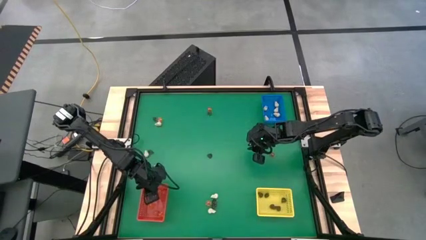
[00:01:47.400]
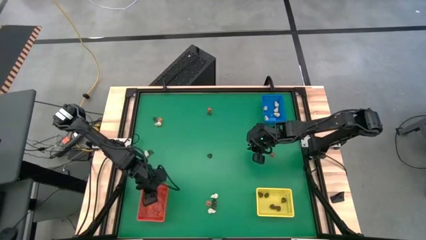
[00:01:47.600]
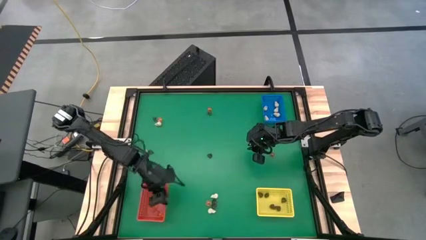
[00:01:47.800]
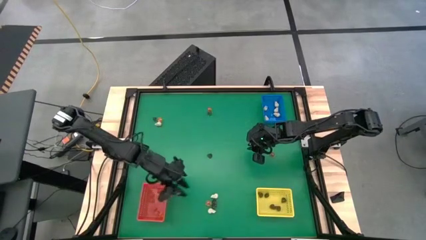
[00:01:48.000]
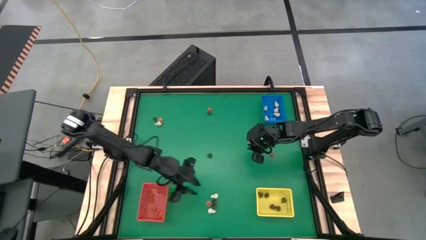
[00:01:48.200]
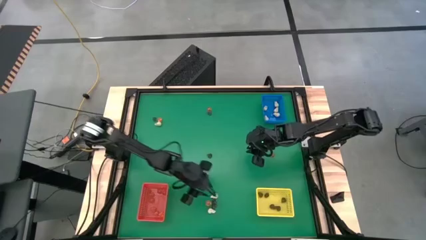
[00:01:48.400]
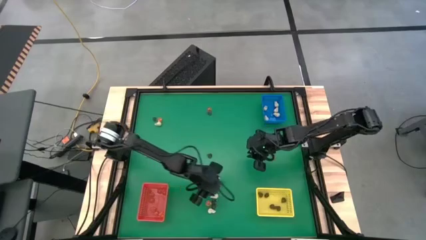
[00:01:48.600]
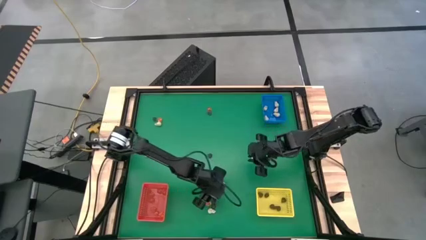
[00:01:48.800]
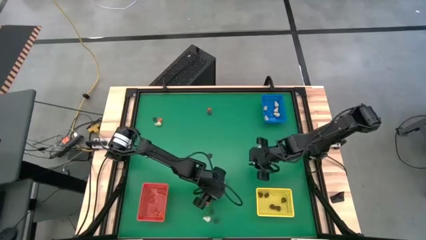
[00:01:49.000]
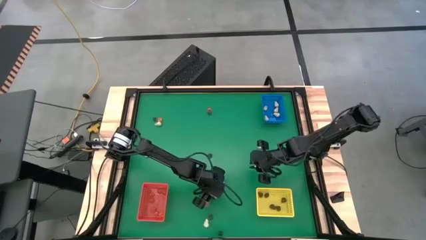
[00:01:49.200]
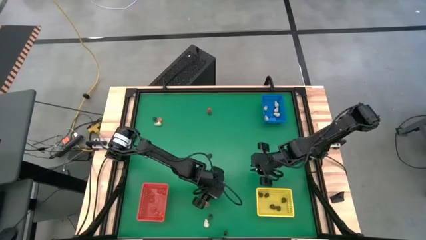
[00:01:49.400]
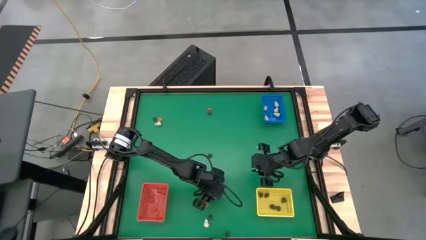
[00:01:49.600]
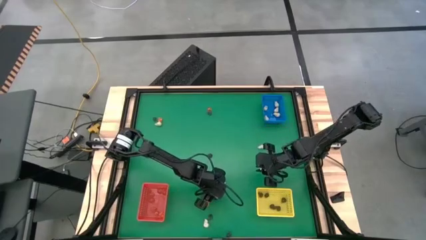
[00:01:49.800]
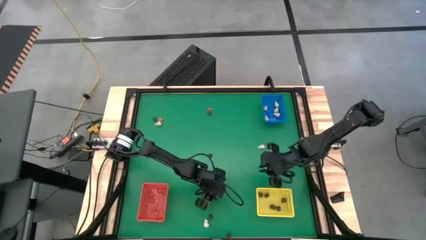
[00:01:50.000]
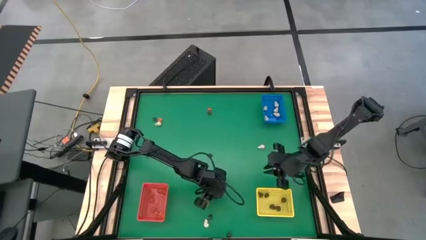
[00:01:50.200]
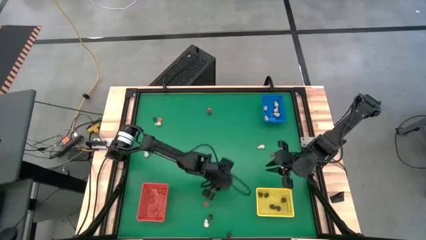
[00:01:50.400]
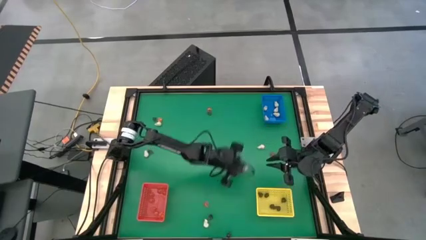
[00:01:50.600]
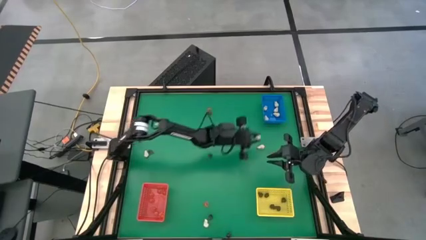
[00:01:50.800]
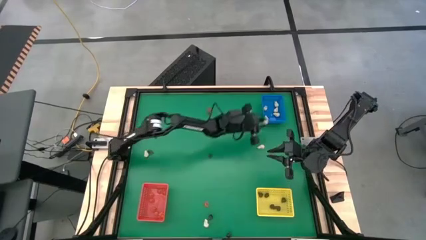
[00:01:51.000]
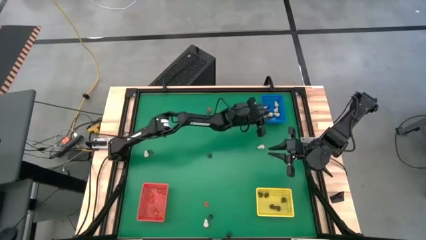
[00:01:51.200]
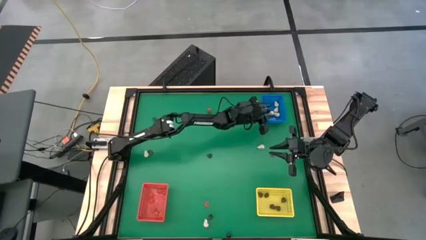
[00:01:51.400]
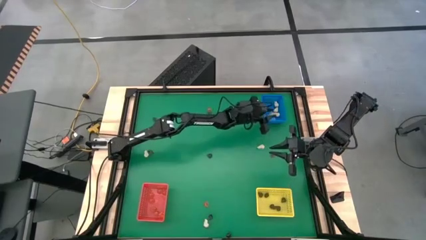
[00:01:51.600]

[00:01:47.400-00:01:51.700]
Task: Sort Halloween decoration
Put the white skull toy into the blue bin

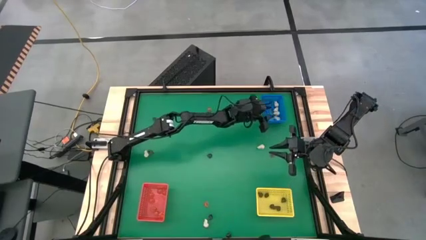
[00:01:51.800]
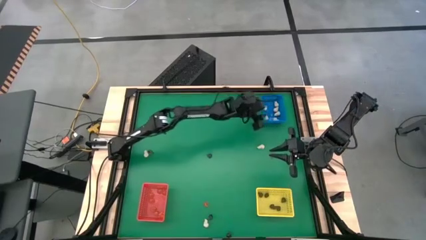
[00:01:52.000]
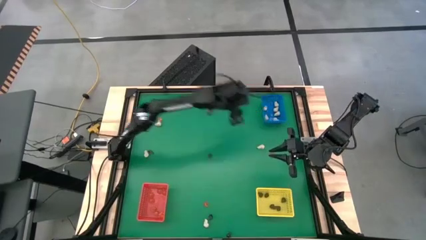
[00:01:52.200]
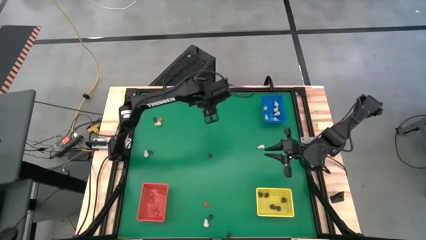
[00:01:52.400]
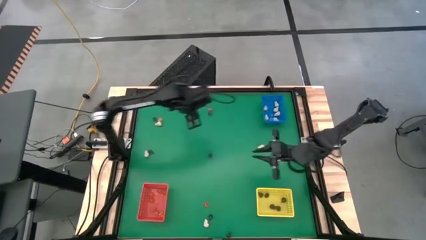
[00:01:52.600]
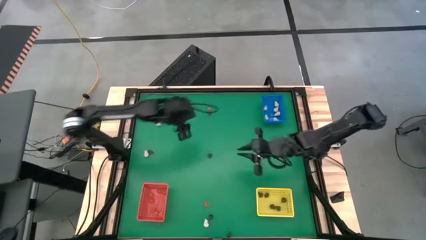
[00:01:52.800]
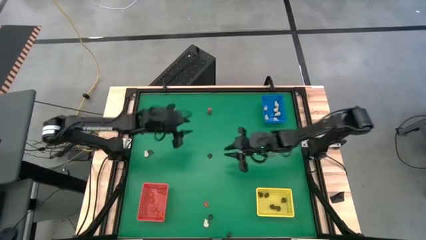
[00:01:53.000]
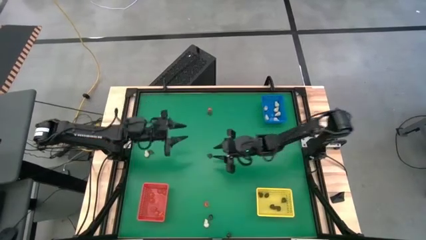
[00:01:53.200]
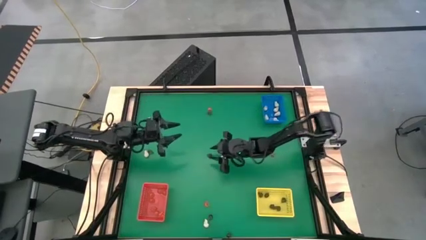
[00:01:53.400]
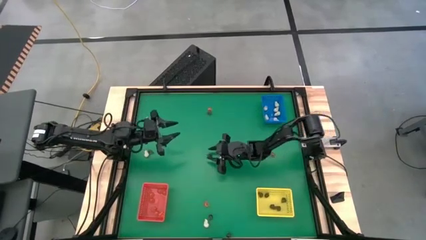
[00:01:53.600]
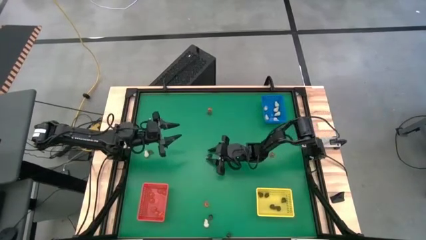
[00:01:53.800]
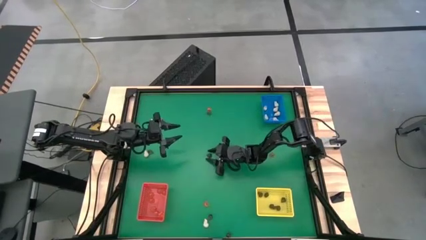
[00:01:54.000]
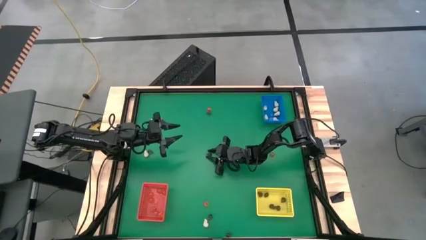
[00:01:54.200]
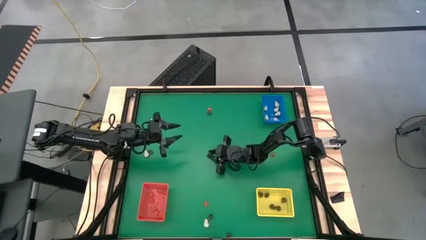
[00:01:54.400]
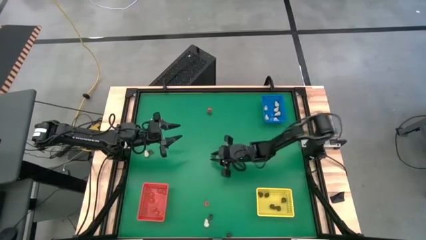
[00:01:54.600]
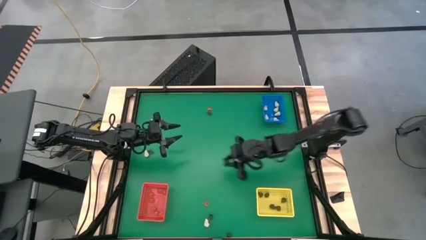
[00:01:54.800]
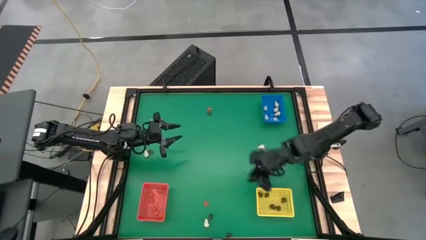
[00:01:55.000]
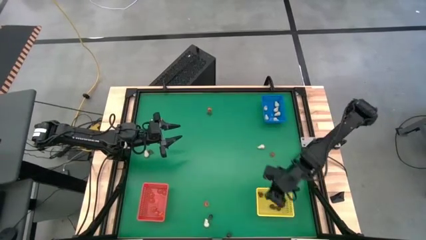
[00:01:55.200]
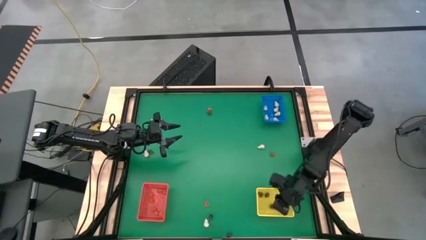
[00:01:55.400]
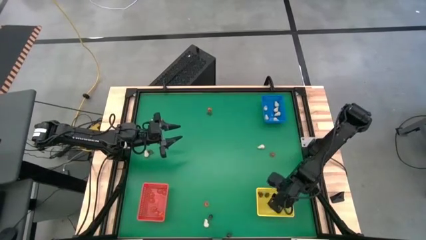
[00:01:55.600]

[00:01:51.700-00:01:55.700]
Put the black skull toy into the yellow bin

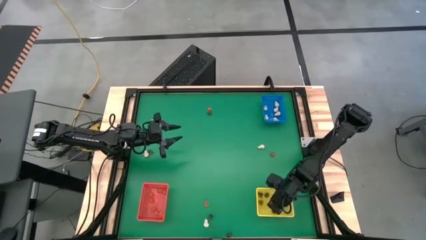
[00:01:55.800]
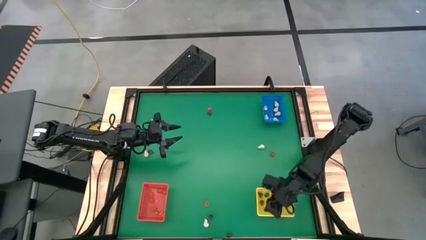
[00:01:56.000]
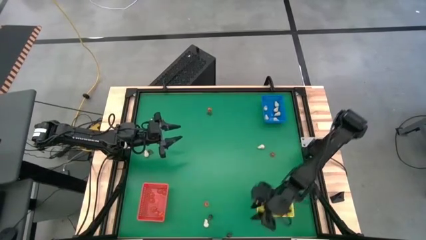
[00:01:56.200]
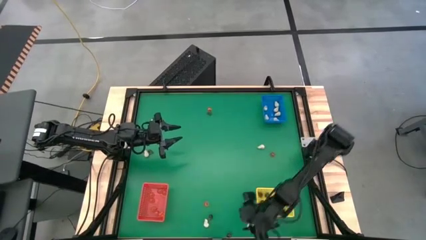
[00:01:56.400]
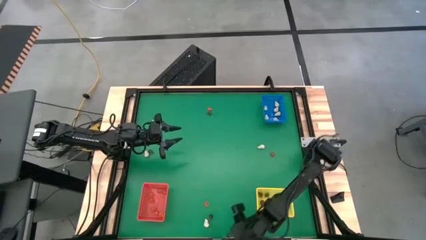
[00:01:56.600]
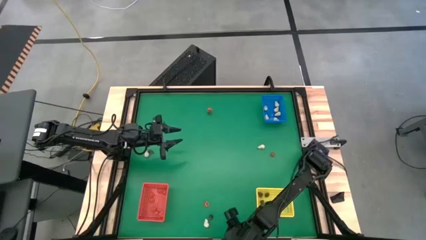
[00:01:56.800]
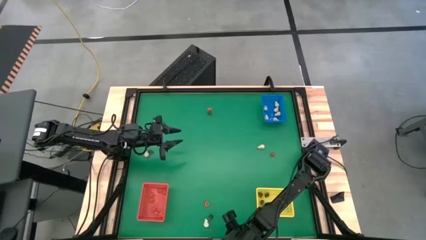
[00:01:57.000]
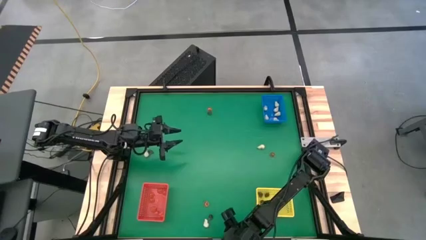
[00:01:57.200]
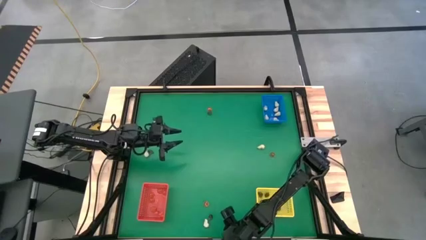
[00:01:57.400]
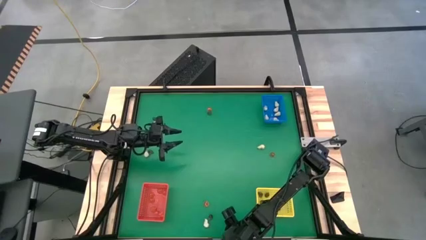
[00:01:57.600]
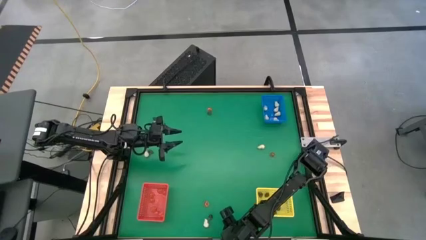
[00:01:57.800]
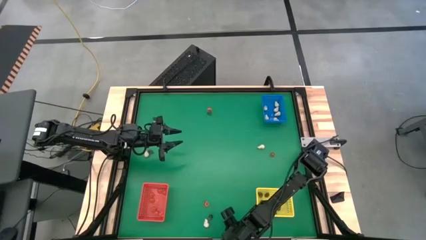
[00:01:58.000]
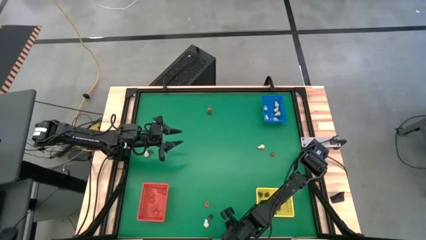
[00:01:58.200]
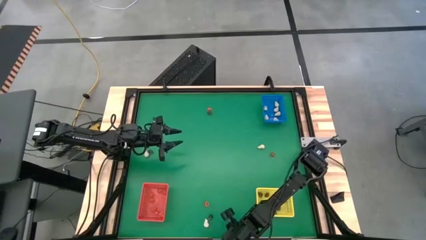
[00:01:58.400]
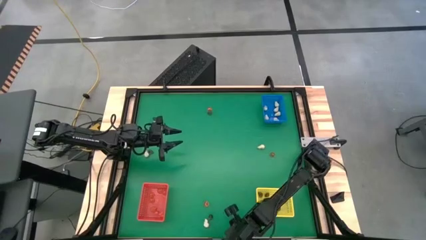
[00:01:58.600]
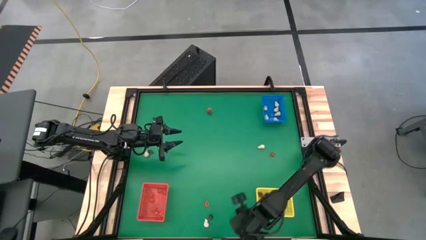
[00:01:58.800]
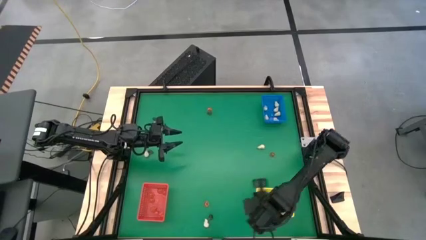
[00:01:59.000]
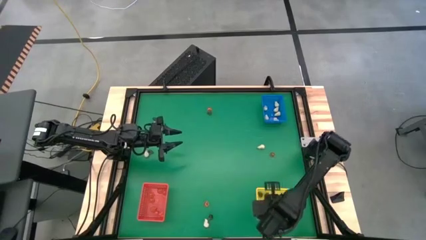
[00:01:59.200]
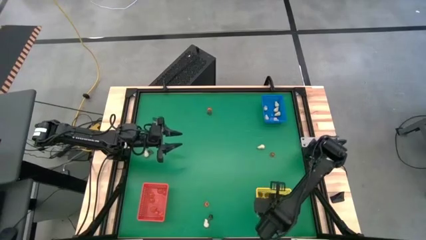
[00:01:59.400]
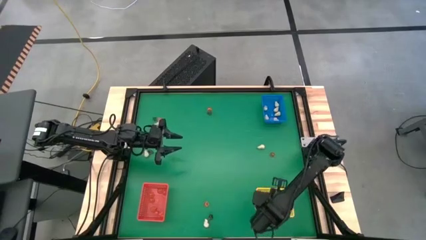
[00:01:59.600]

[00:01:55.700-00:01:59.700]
Put the black skull toy into the yellow bin

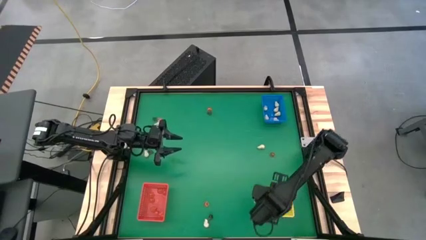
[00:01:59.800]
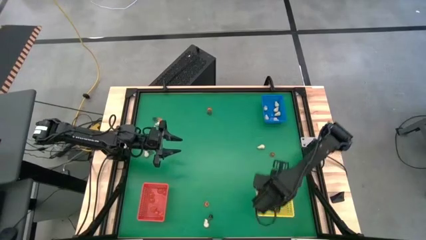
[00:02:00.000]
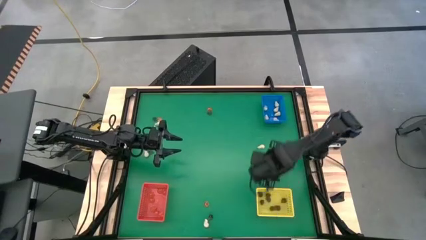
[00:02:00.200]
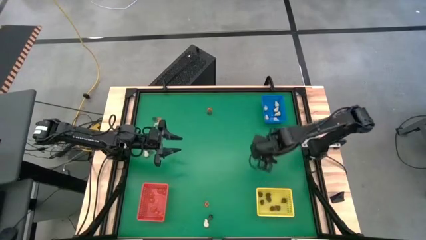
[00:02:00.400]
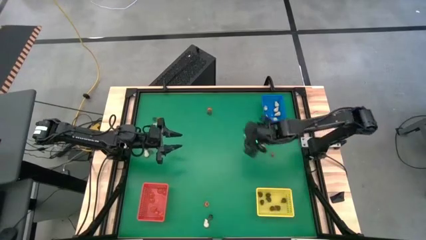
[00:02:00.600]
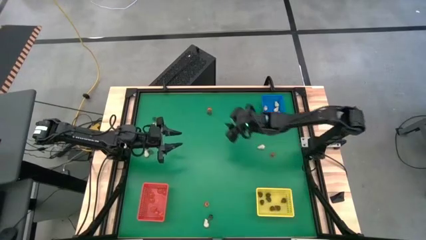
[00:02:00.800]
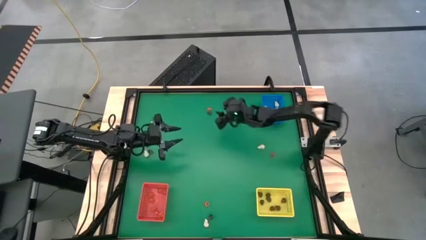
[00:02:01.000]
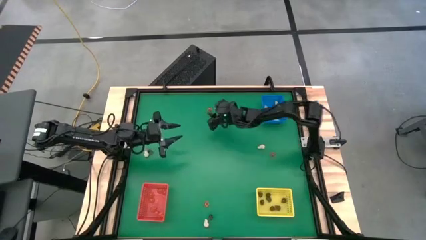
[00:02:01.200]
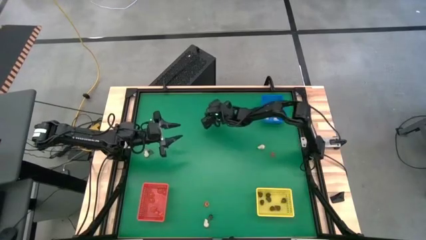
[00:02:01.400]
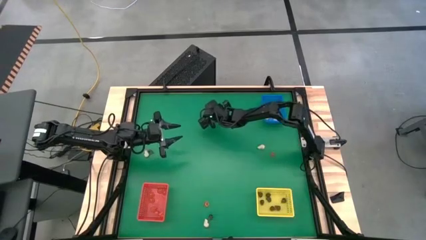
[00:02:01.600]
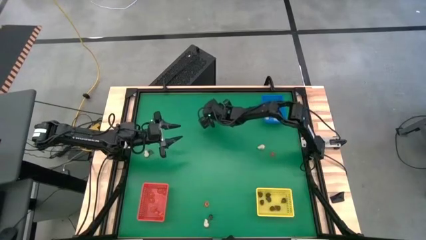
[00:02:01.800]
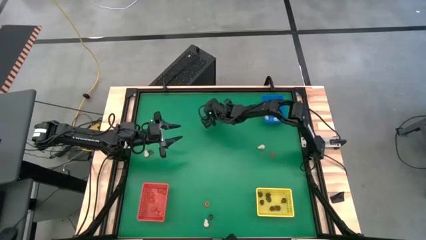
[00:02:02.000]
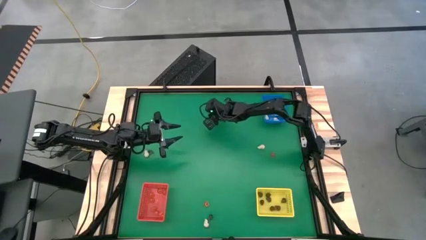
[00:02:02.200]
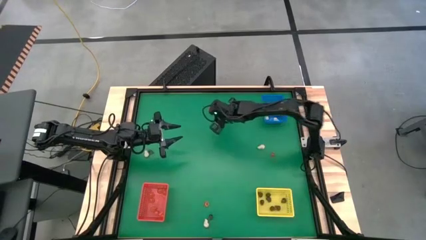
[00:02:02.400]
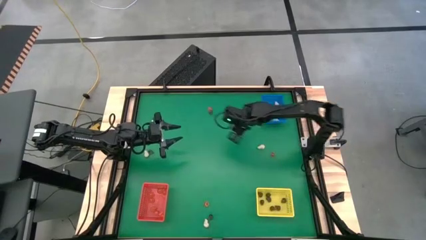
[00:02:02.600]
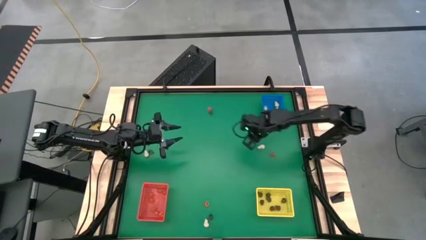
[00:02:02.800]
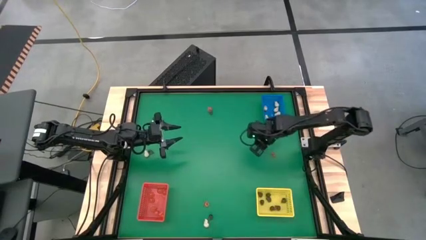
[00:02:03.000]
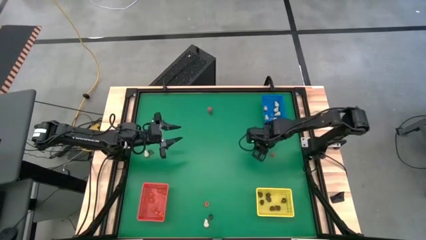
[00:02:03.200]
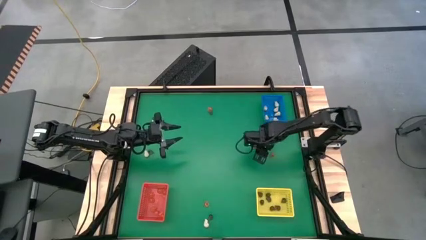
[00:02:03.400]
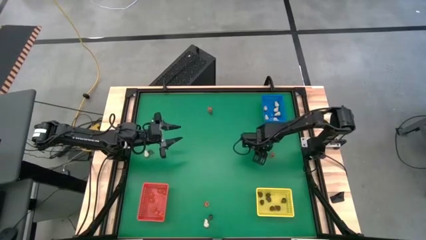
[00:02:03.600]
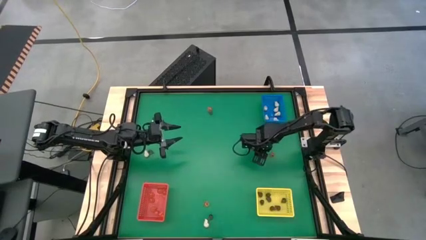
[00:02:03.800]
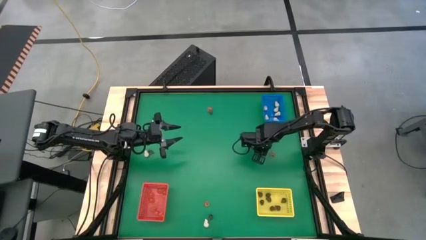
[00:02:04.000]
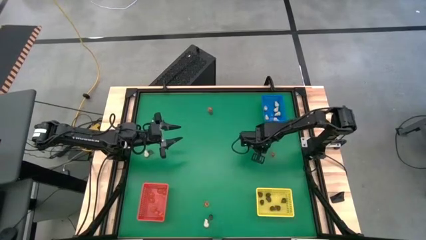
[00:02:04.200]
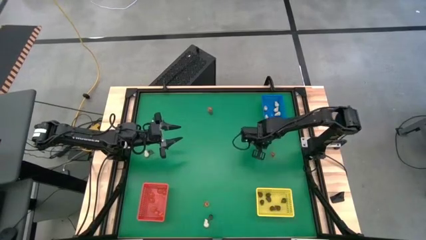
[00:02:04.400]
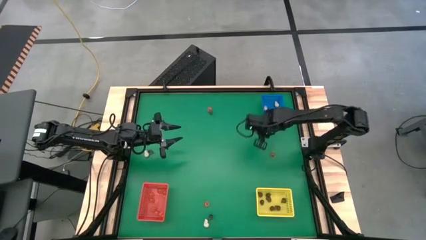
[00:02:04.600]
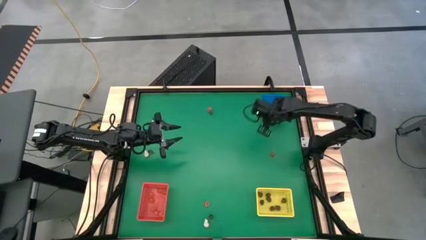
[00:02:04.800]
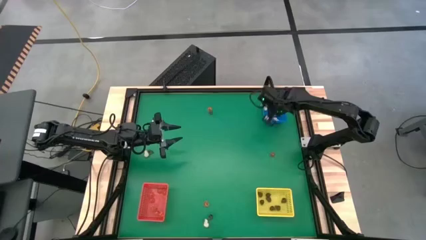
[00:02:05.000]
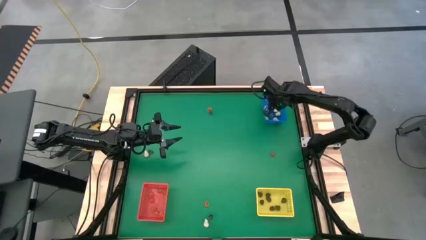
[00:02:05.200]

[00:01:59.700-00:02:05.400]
Put the white skull toy into the blue bin
